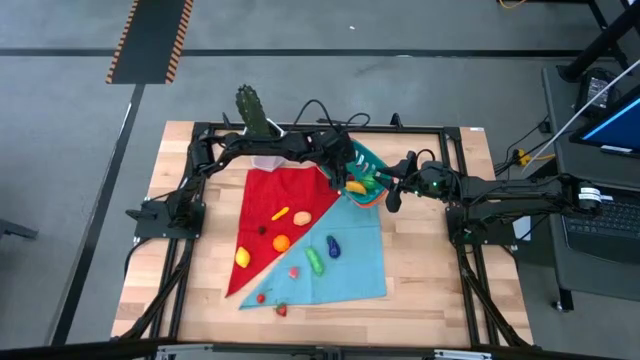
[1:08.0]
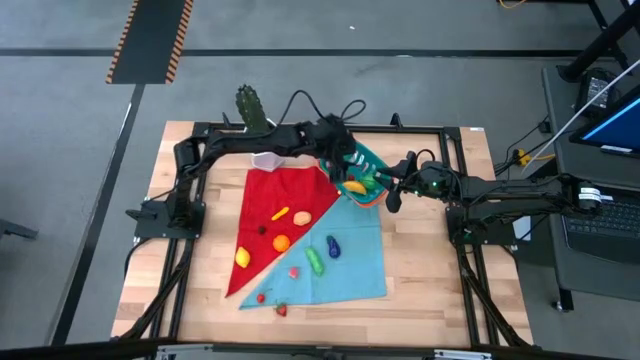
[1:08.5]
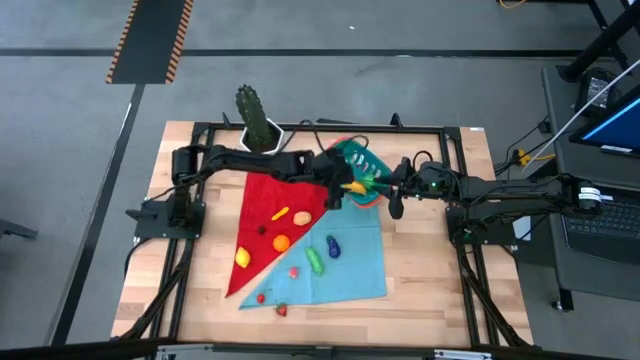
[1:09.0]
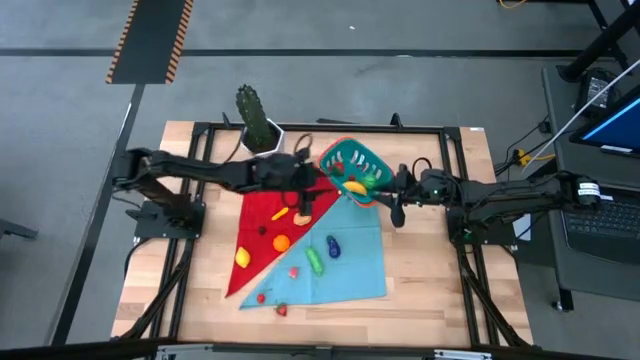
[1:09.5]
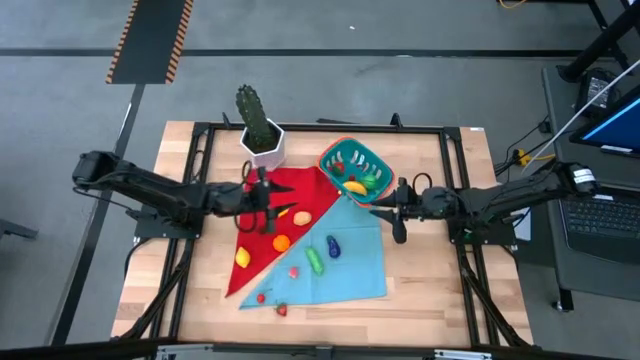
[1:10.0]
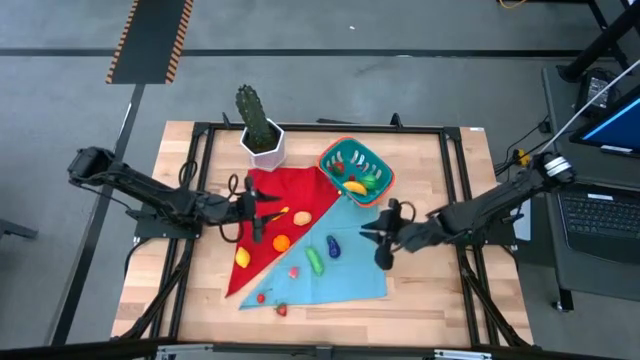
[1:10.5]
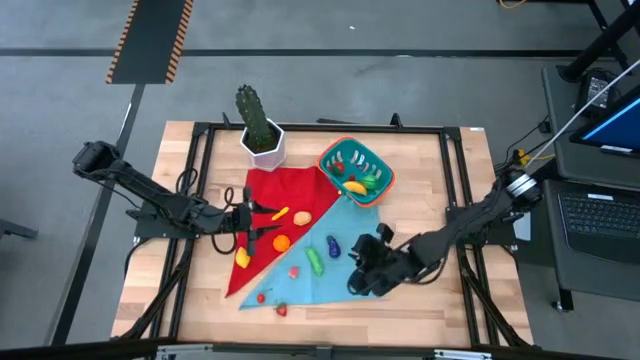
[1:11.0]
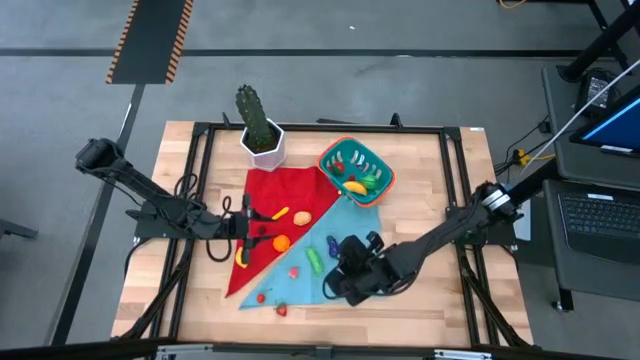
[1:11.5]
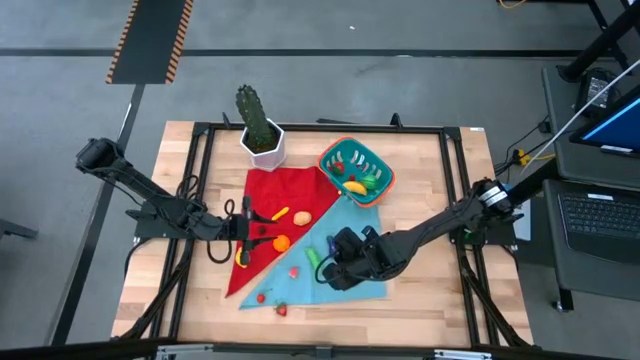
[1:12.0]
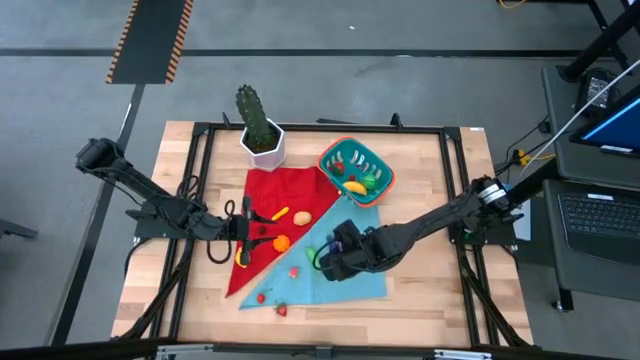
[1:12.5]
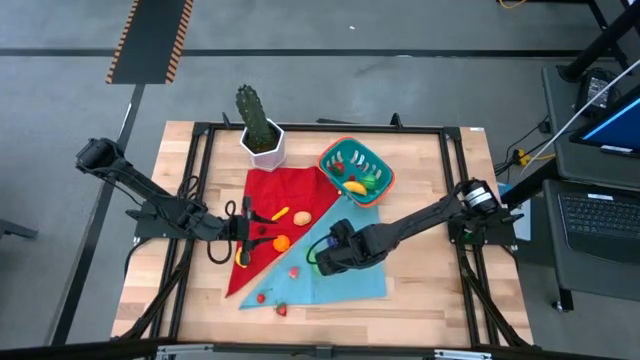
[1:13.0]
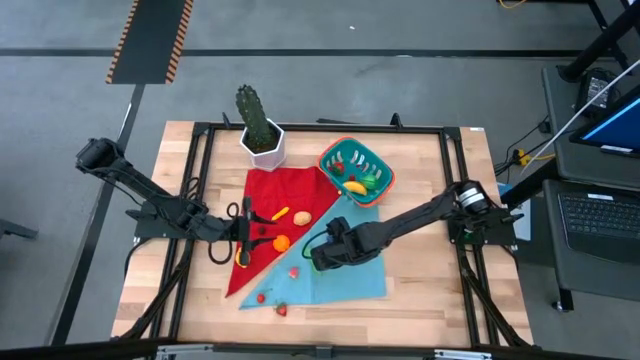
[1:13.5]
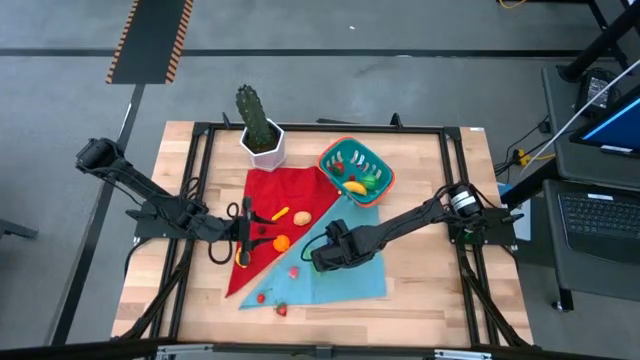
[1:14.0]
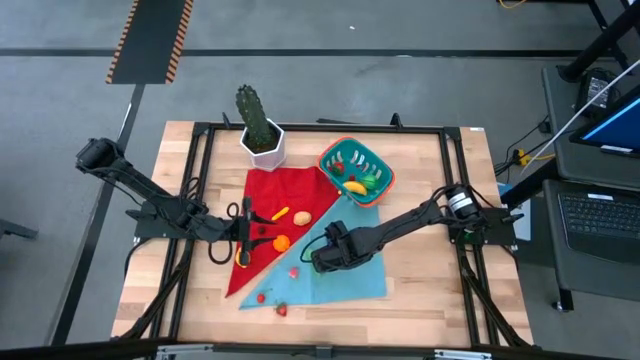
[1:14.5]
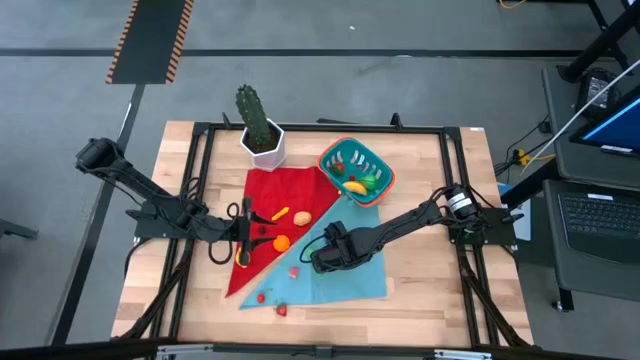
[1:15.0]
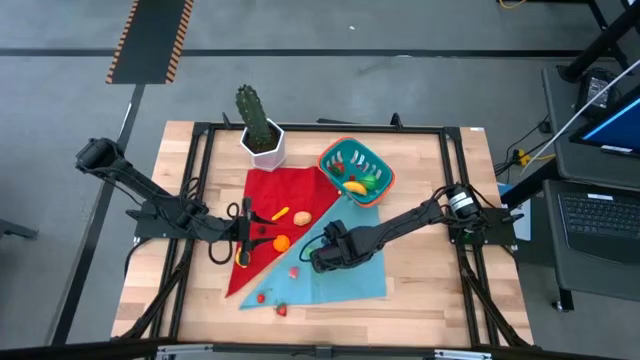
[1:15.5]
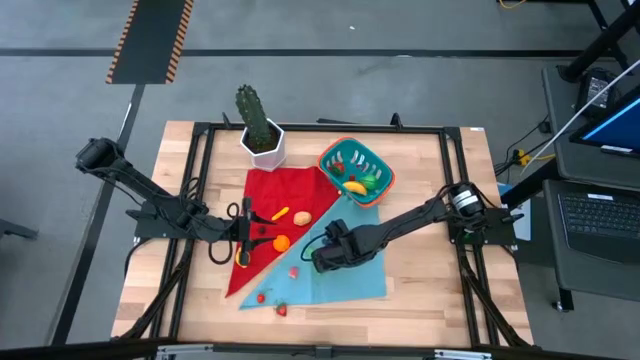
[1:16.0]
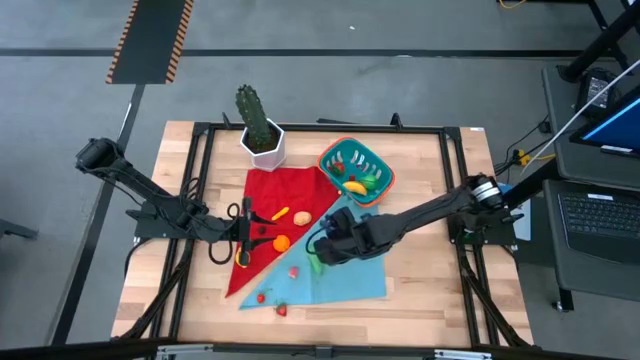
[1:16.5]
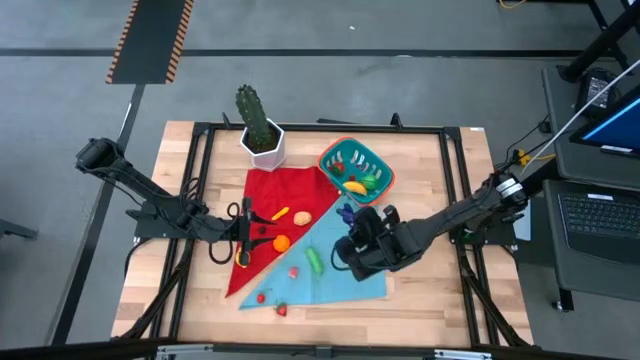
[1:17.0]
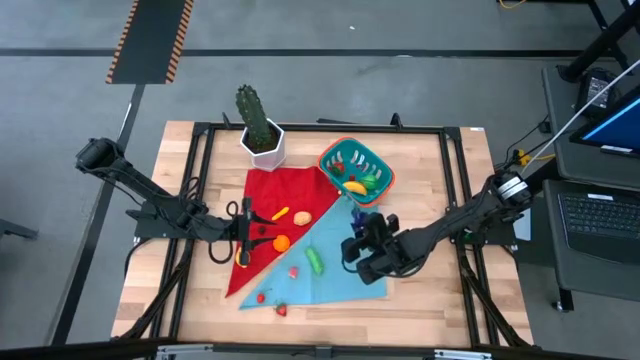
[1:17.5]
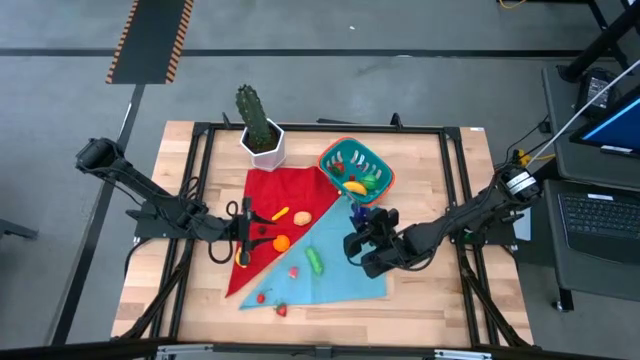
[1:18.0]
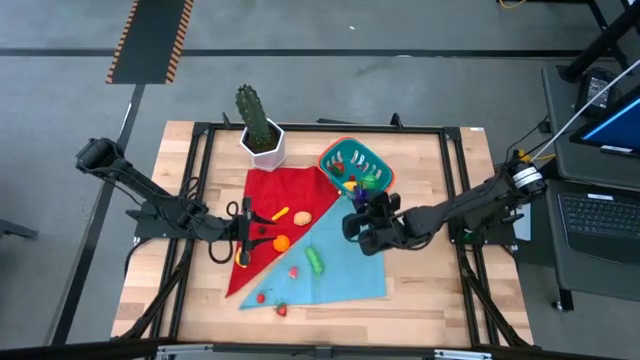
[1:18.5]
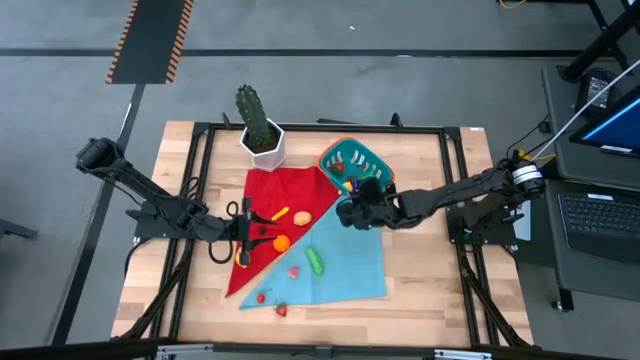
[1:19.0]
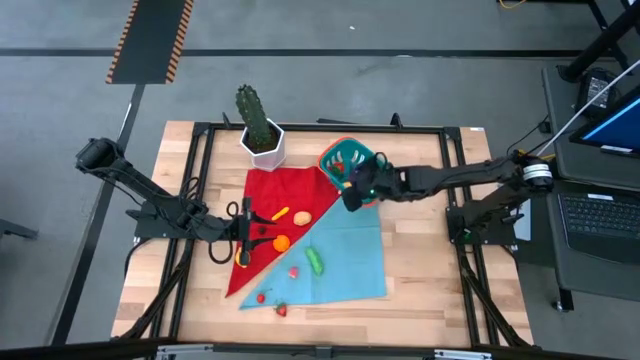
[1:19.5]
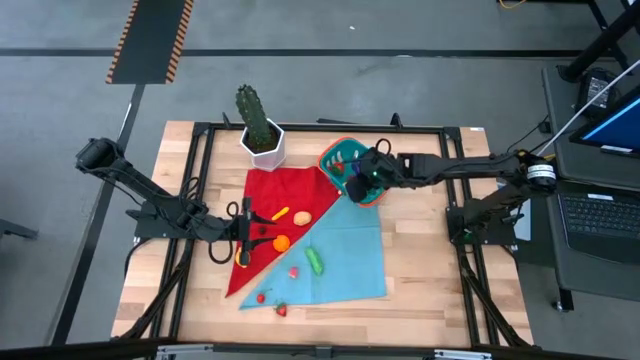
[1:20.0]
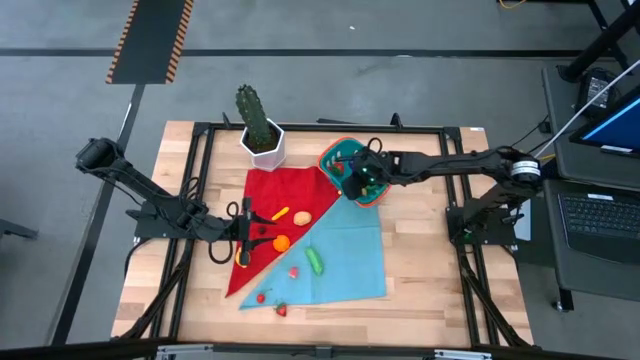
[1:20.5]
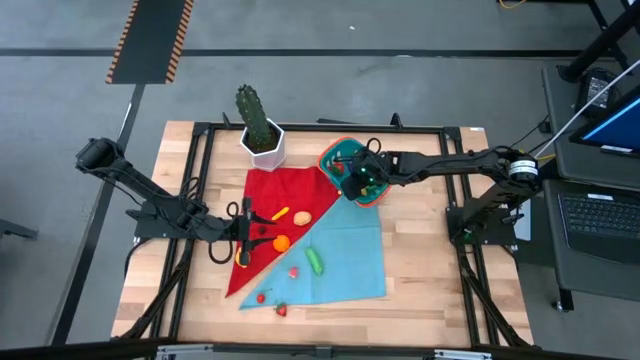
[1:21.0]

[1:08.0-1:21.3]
Task: Build produce basket
Put the purple eggplant into the blue basket

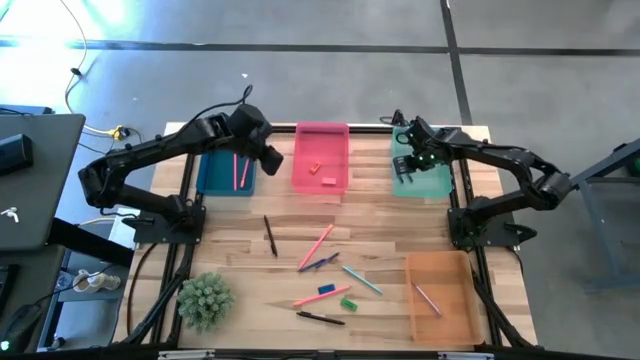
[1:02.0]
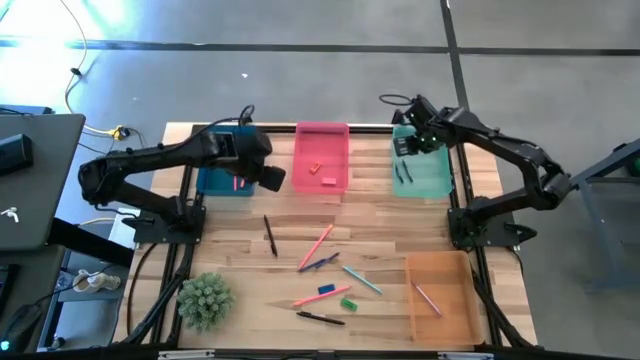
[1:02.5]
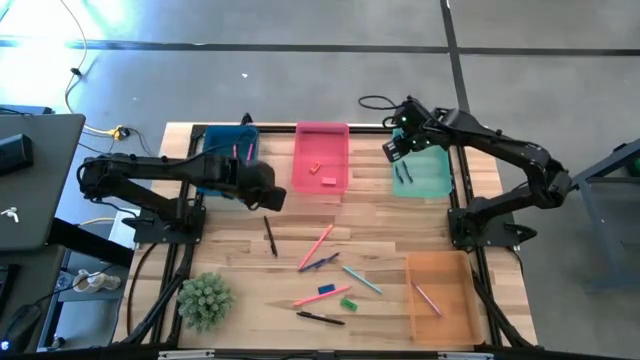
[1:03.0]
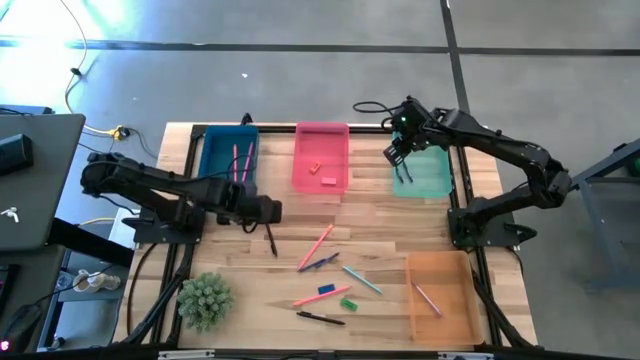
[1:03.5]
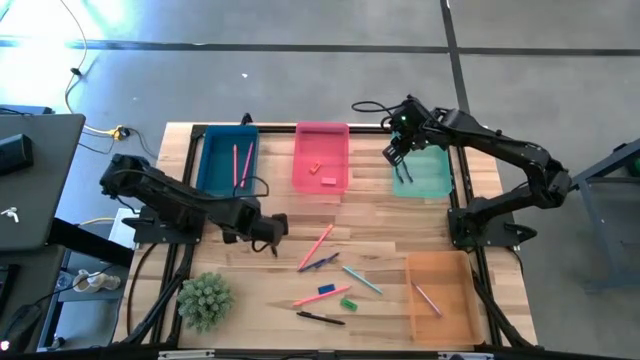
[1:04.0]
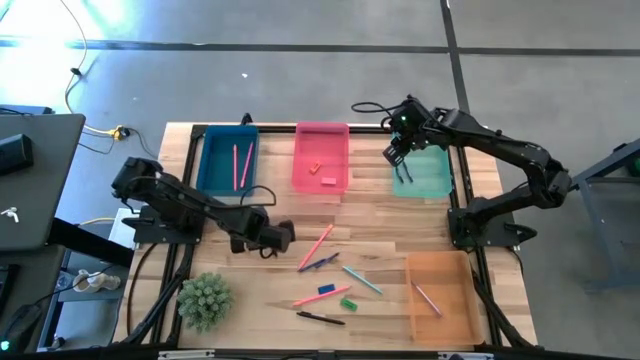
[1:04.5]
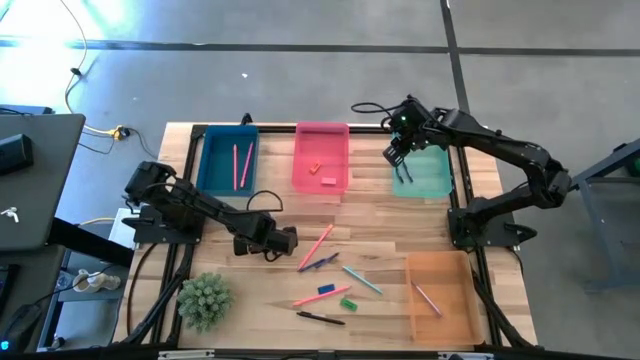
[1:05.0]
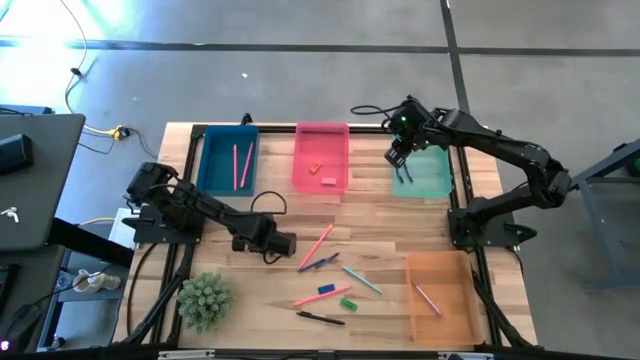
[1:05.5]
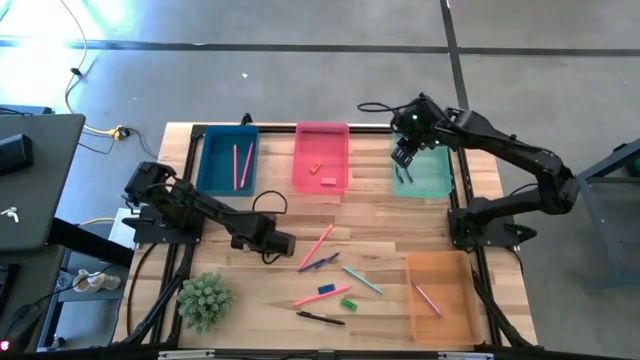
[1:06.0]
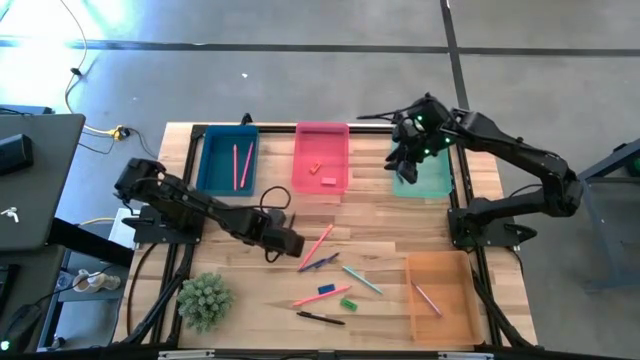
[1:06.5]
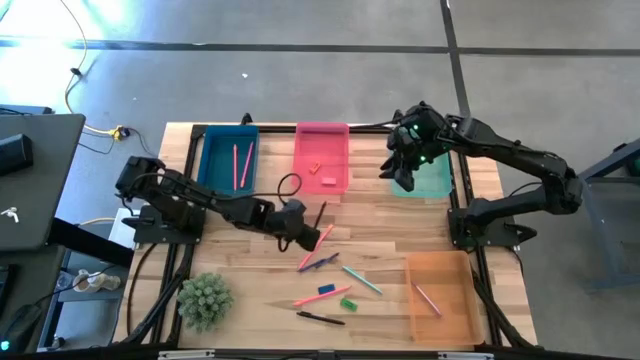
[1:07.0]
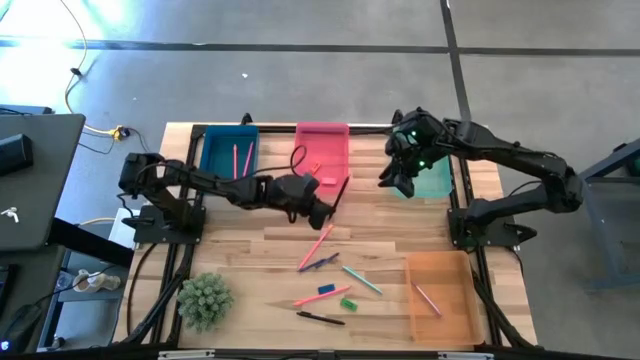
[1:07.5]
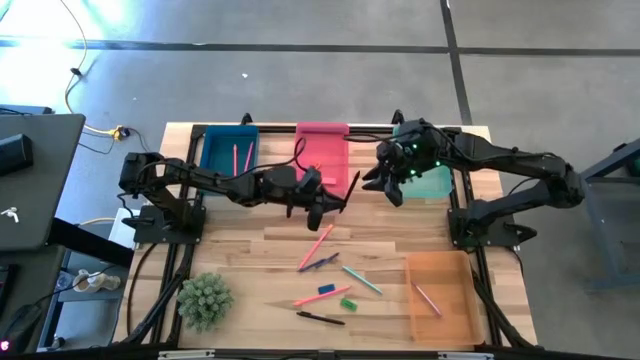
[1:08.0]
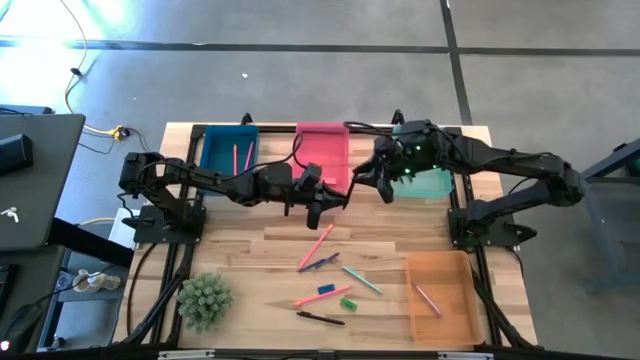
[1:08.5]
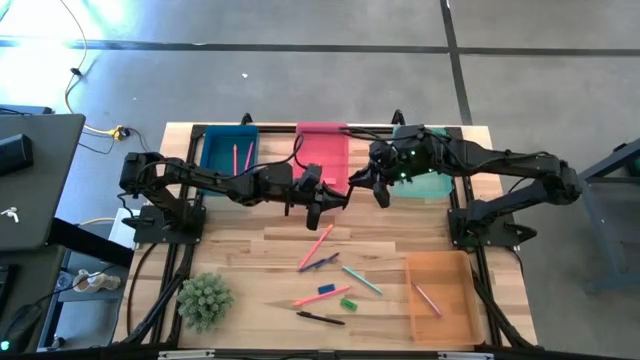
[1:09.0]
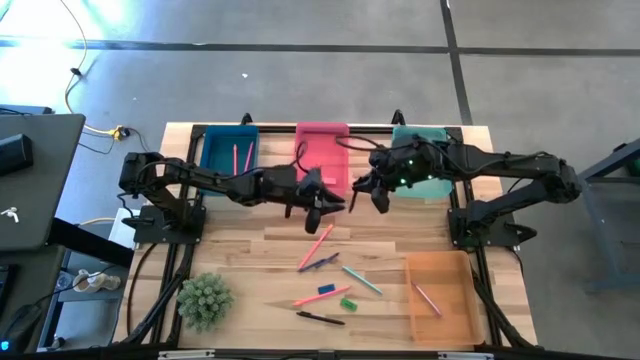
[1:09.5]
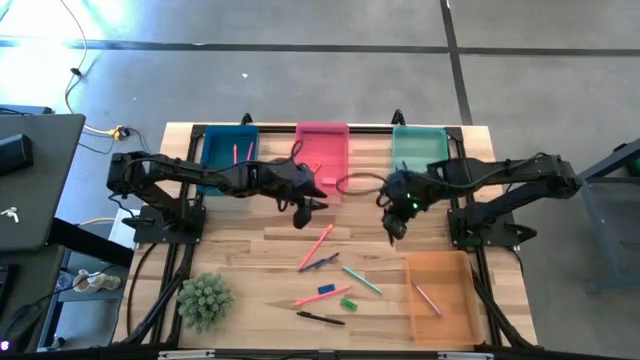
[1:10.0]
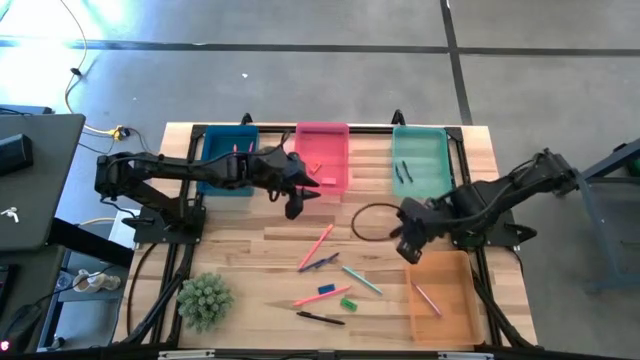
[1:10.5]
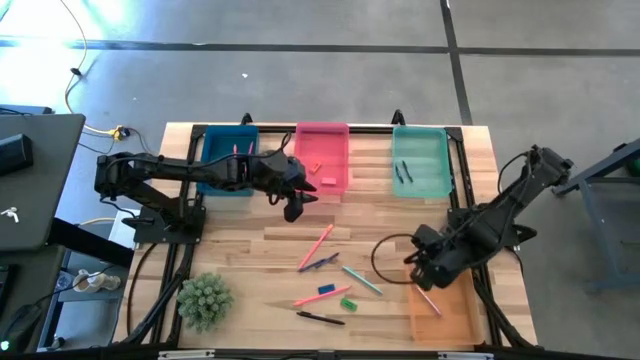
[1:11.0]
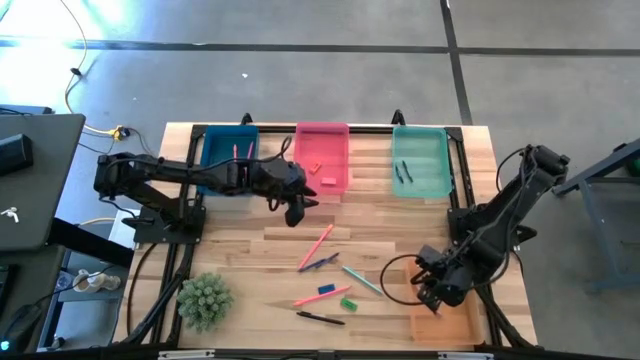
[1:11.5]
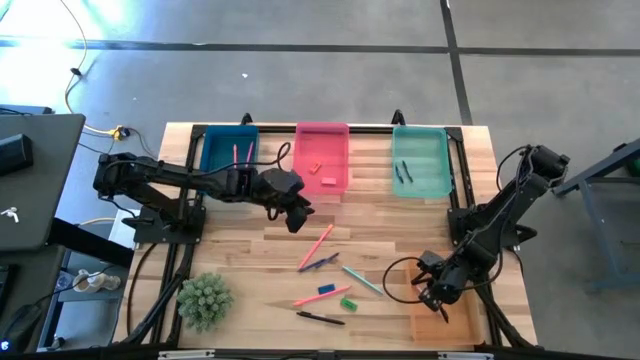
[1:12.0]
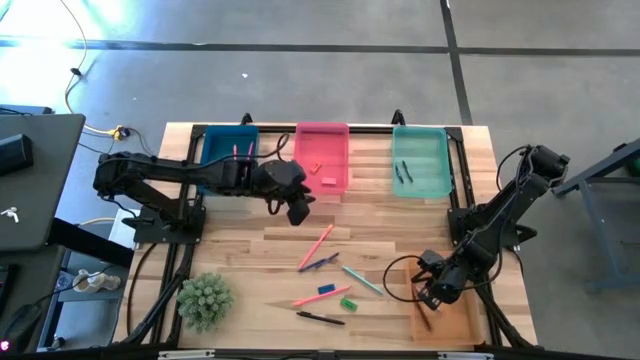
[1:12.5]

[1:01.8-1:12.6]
Task: Sort crayons/erasers/pens/pencils in bins
Put the black pen into the orange bin
